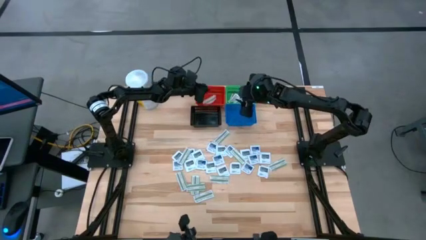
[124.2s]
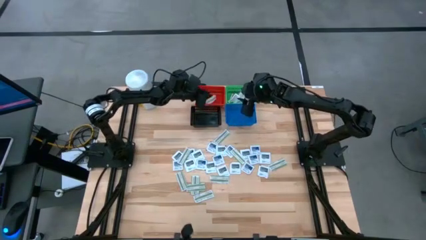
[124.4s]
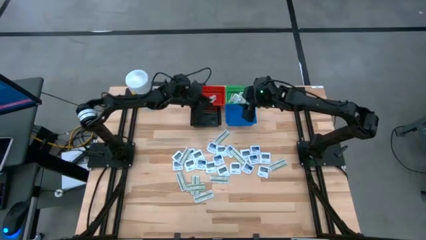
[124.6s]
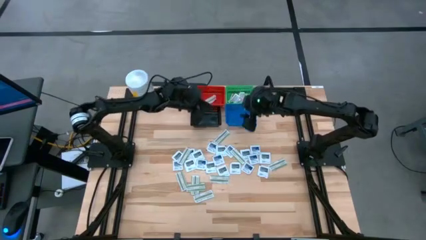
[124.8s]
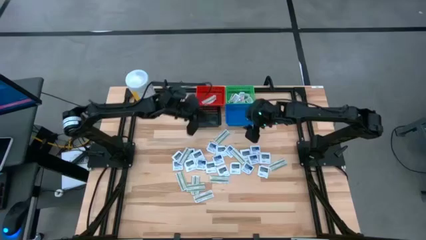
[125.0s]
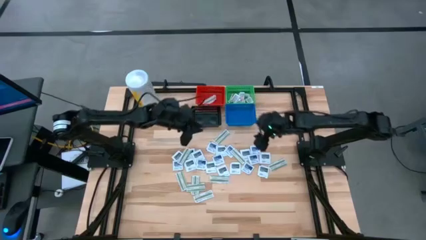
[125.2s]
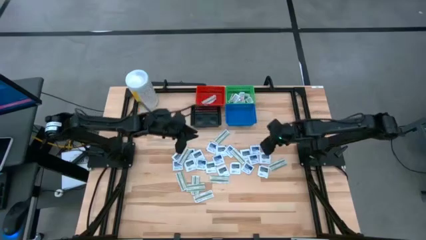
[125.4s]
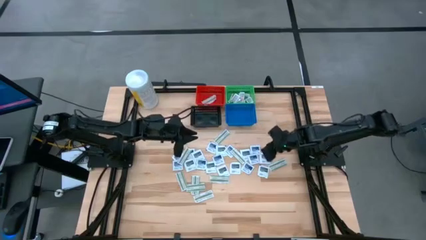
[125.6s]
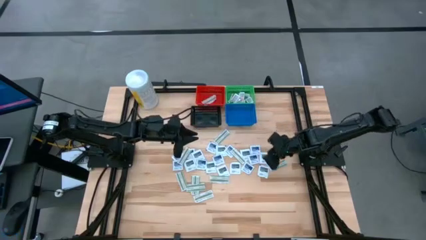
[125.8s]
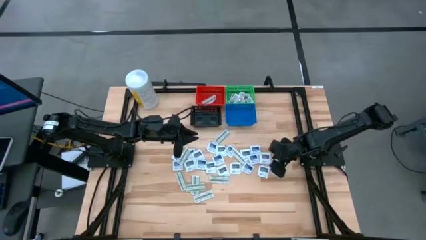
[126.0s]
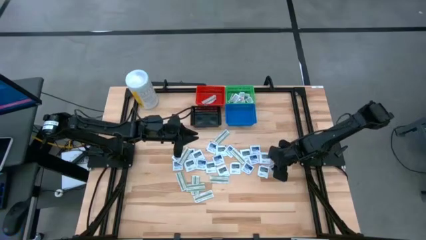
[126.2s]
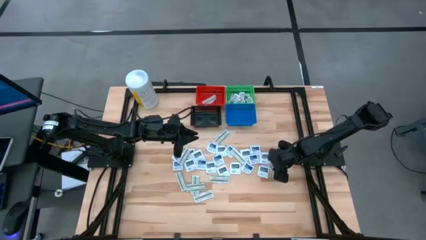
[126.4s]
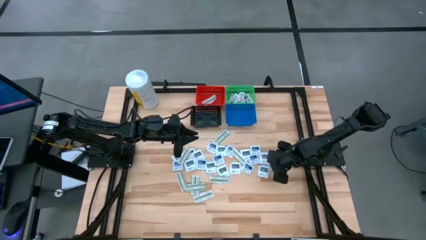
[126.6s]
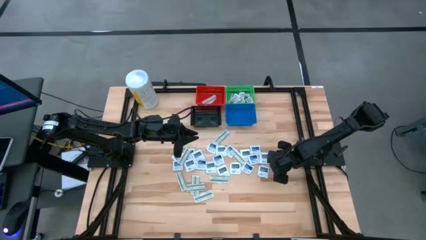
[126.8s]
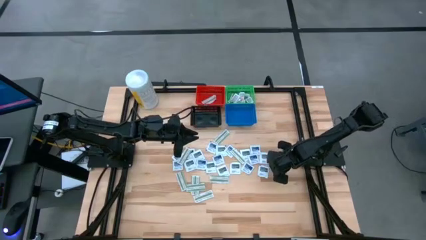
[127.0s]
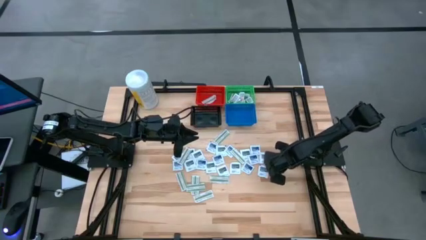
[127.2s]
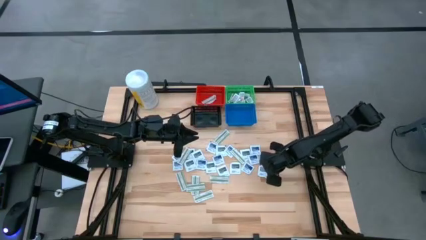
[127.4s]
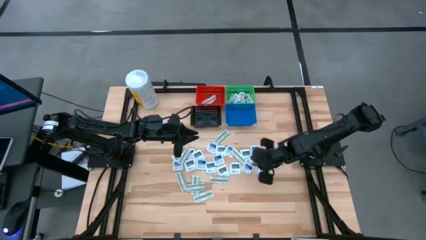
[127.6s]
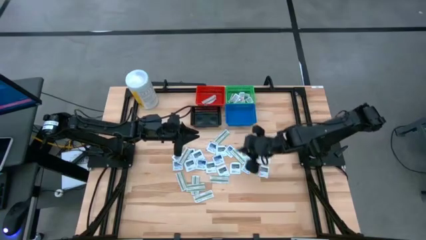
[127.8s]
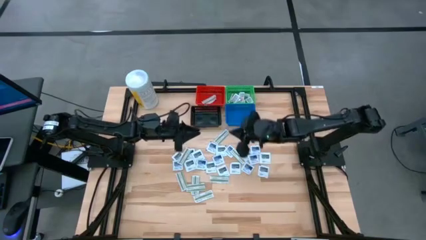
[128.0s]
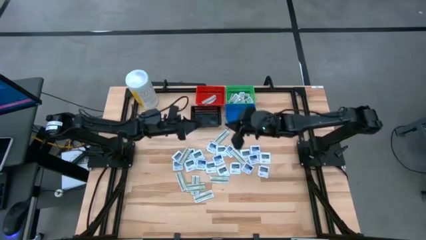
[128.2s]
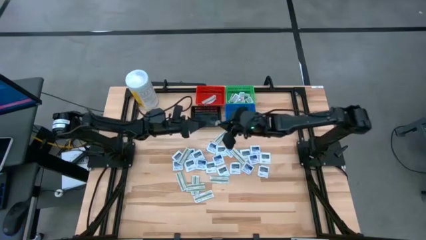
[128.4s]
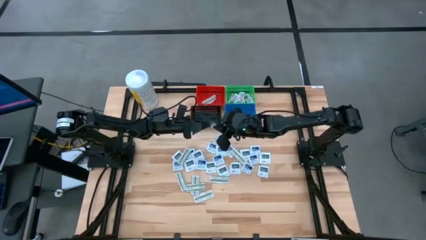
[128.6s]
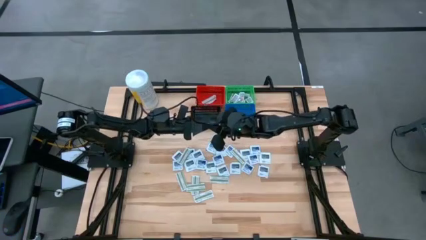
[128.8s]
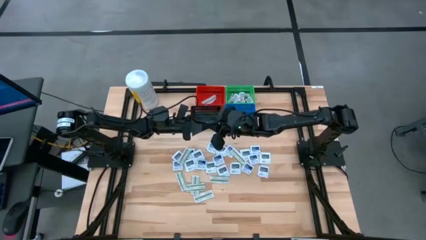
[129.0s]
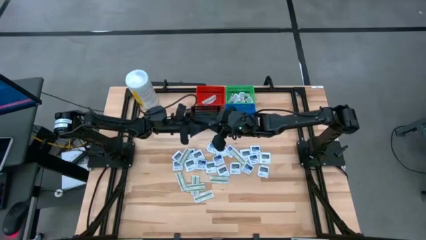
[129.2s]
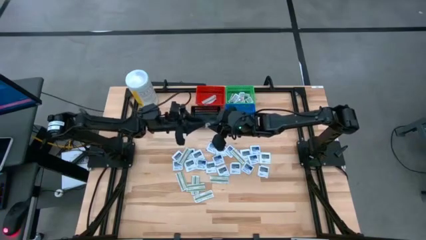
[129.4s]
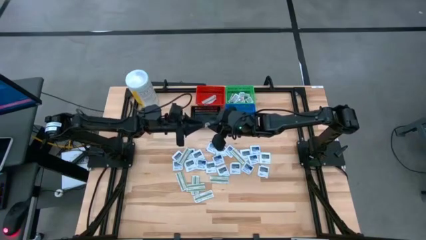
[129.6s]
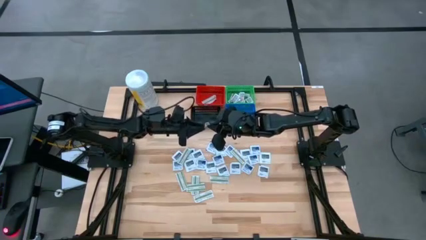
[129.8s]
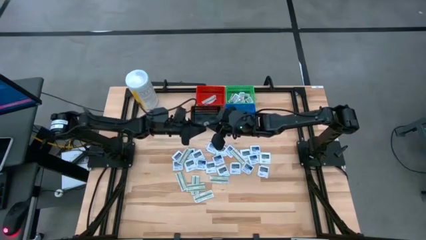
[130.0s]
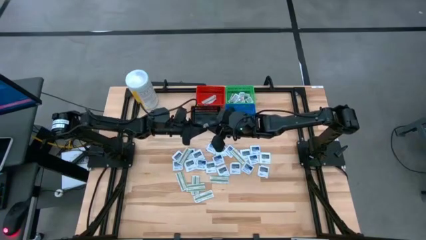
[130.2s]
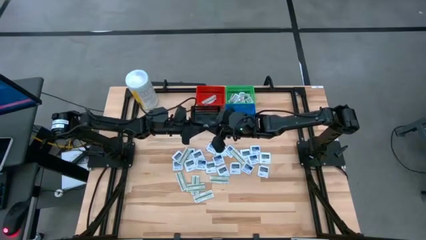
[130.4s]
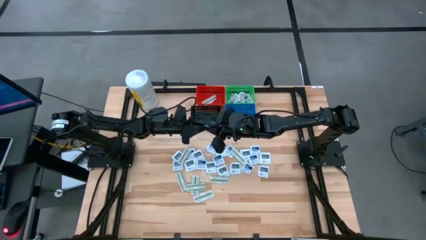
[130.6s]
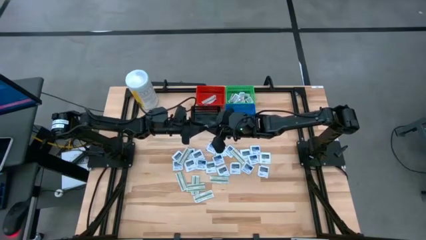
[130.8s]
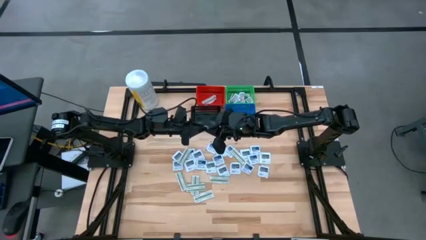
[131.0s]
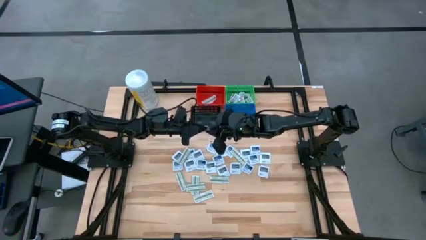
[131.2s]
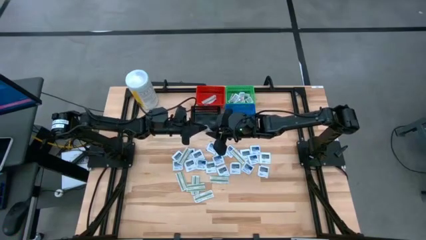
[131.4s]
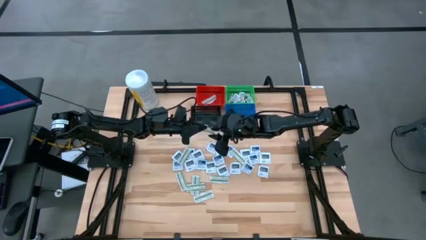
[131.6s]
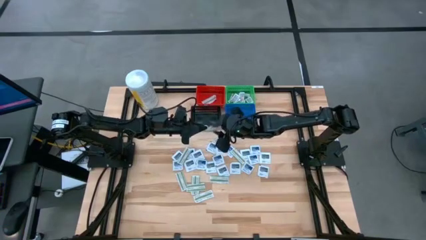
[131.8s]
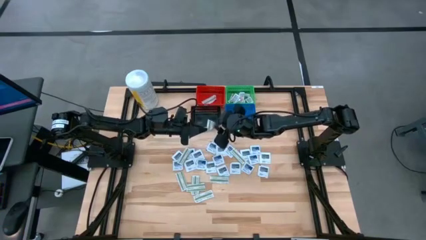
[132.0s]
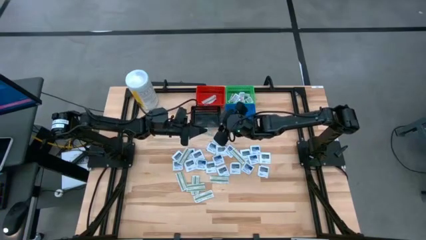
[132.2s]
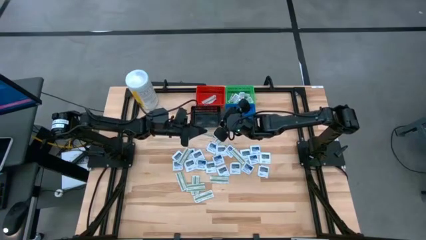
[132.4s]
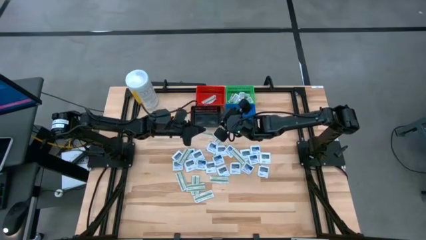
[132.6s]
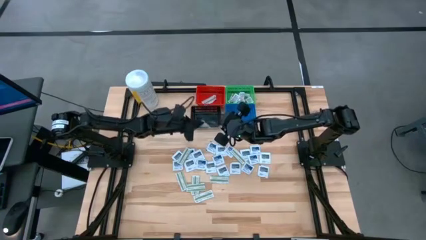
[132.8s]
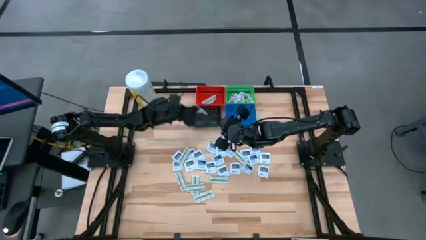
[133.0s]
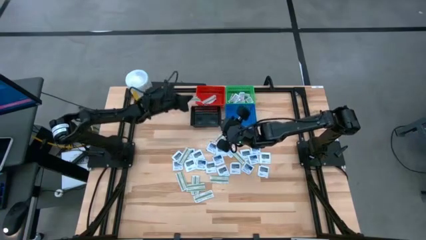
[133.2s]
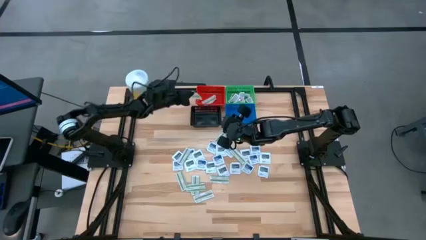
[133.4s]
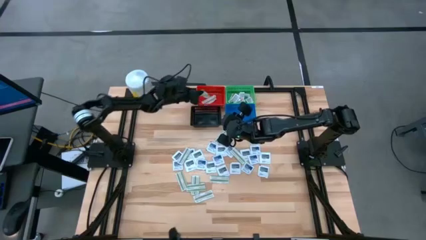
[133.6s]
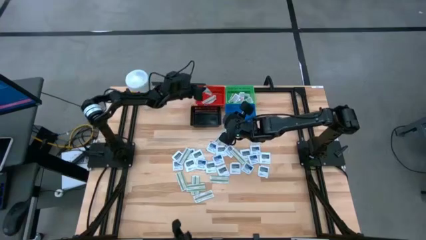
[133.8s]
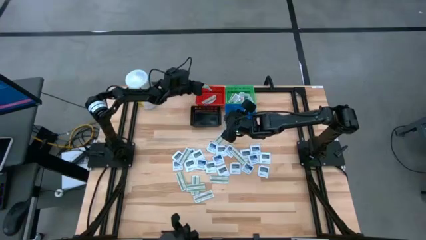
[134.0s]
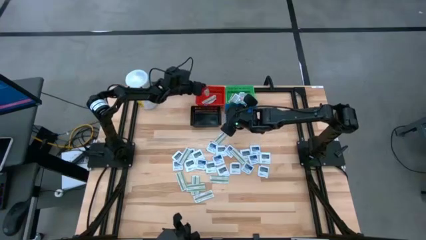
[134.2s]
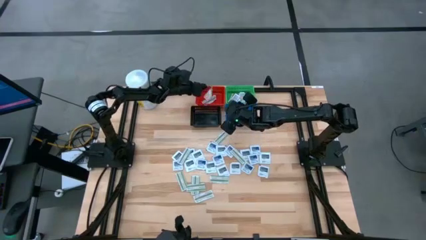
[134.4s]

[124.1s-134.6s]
Task: Pick & Place First Aid Supplies
Put the bandage into the red basket

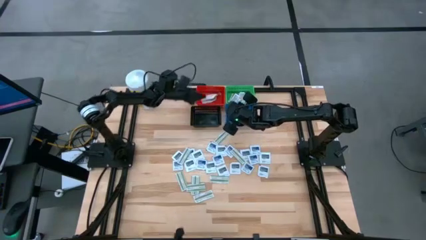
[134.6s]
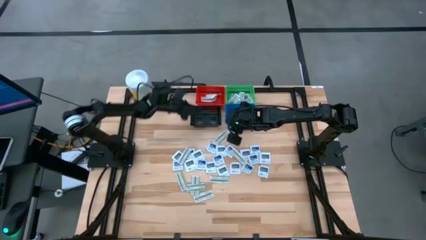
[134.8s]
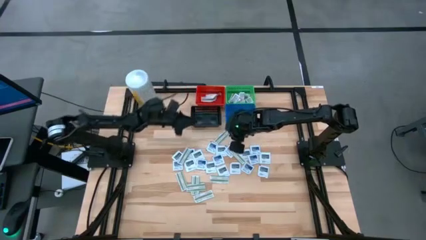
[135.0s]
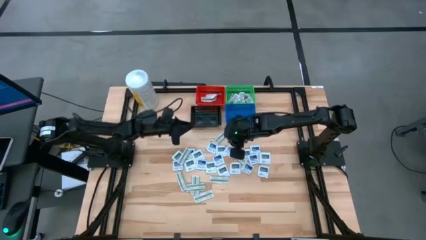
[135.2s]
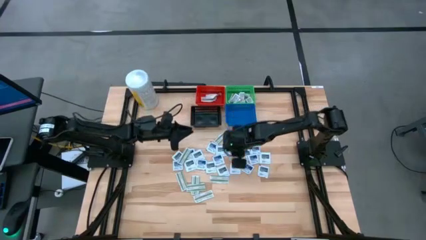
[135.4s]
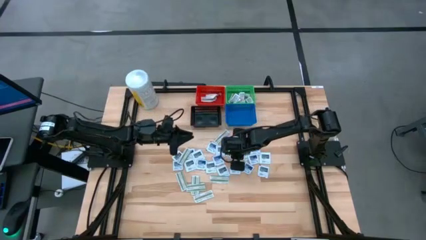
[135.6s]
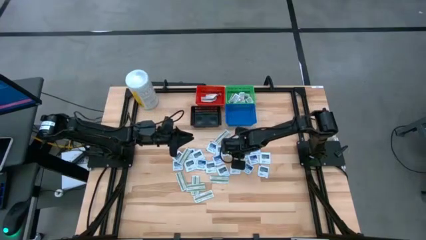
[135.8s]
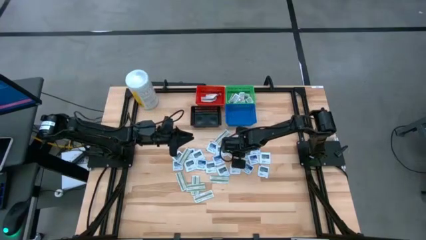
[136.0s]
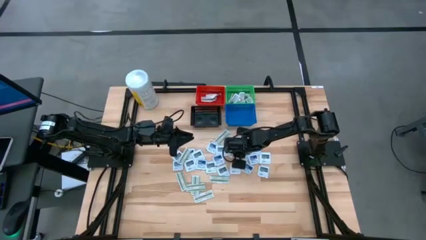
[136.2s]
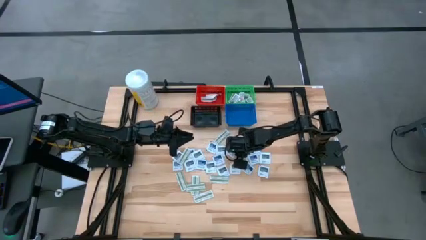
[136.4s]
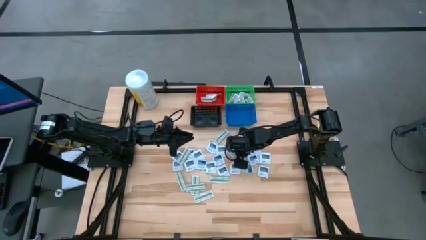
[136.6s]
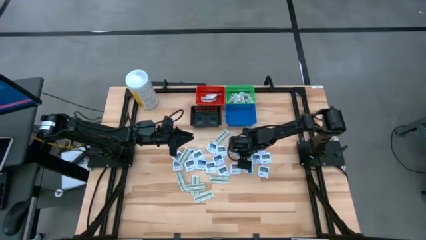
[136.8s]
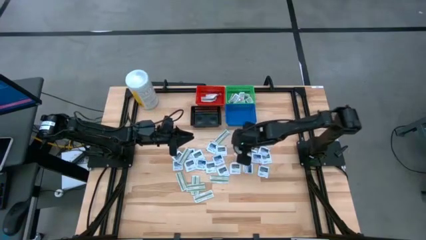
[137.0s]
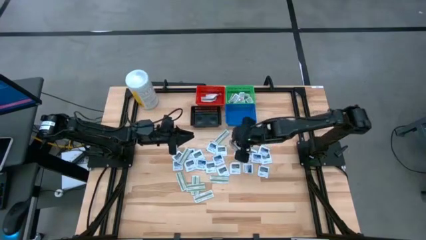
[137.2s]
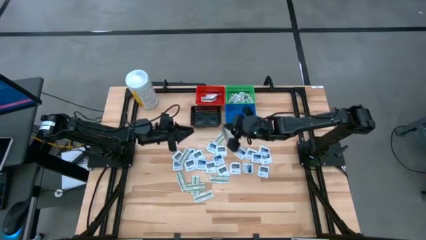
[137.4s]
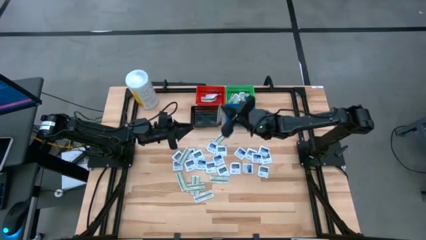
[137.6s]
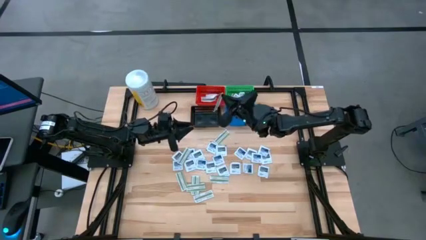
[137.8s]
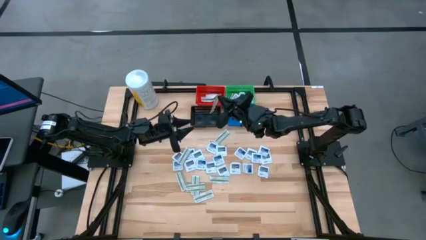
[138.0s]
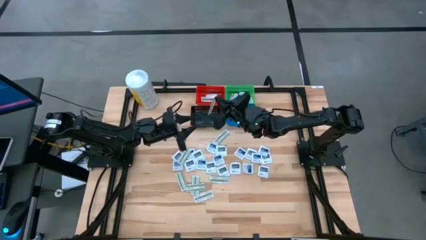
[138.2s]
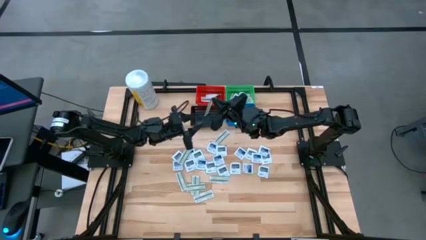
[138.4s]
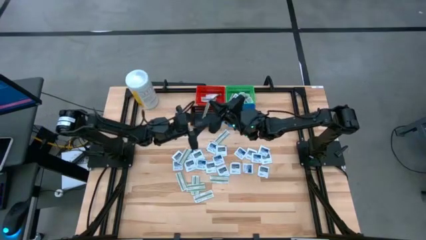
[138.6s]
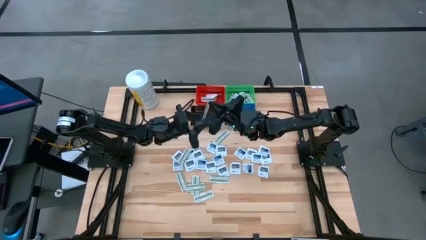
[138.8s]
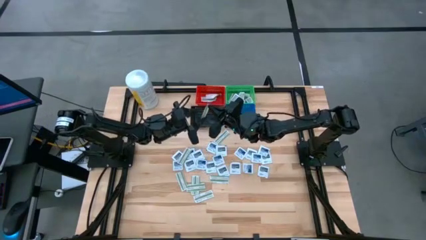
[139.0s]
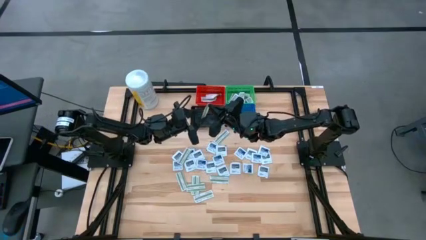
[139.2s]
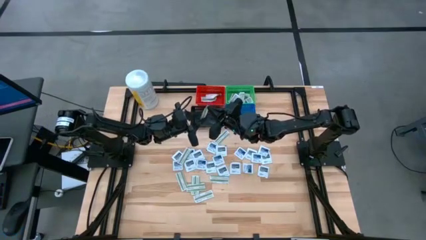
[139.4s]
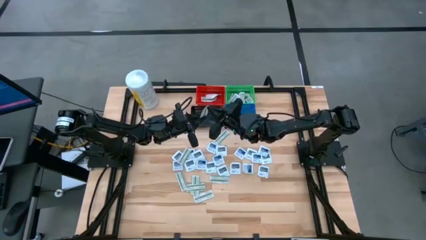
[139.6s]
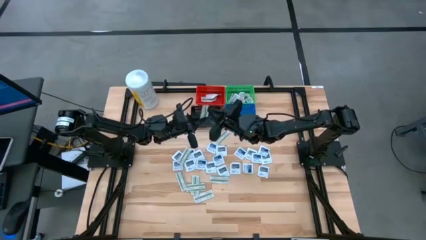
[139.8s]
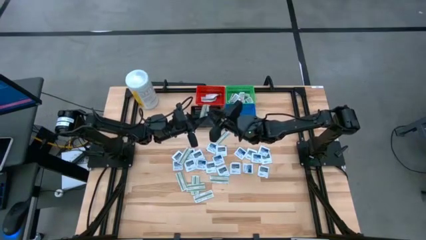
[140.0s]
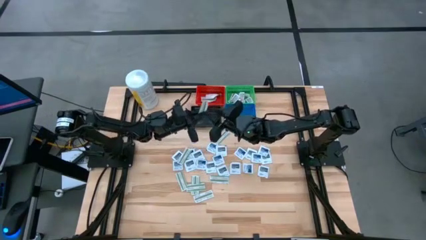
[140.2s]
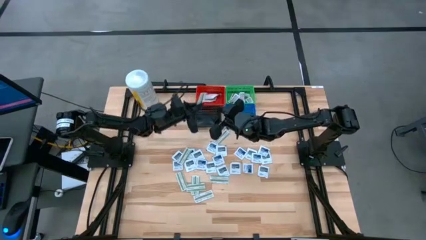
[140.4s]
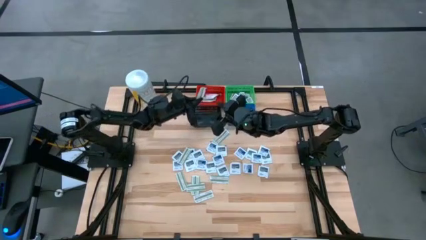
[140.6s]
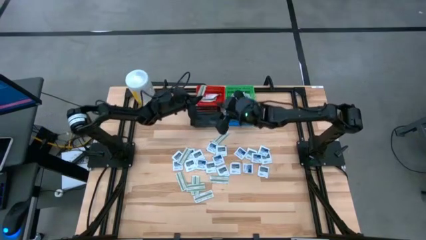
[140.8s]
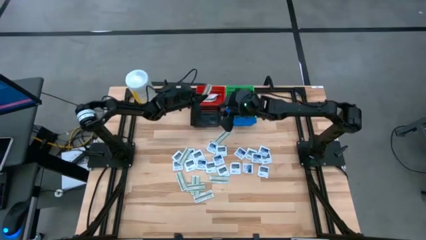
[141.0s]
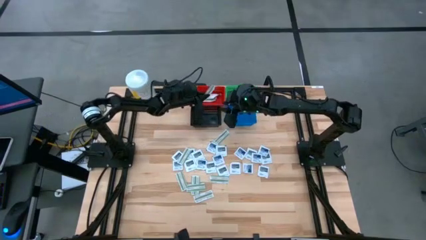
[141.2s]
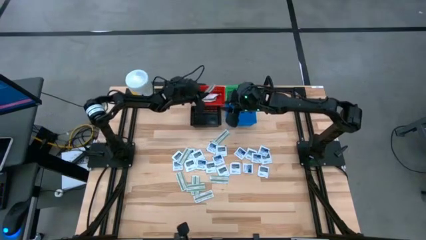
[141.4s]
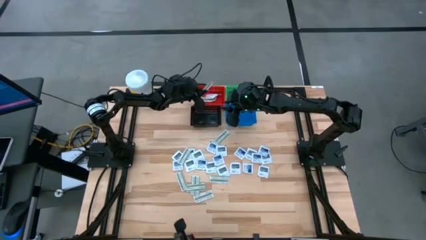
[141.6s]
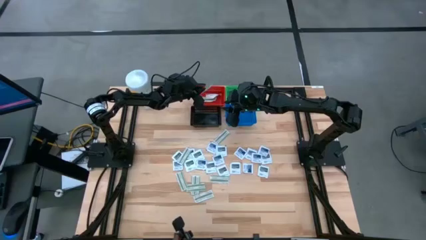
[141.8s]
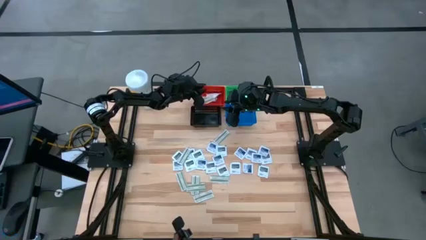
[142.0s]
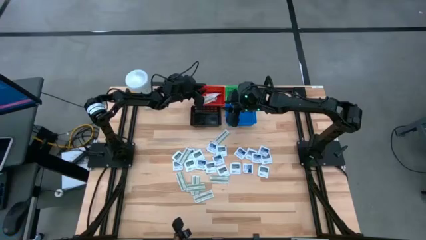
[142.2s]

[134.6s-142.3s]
Put the bandage into the red basket
